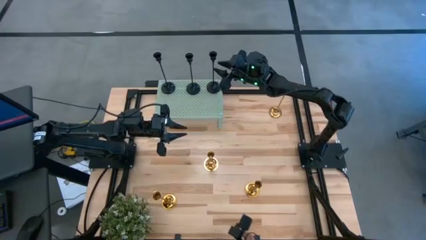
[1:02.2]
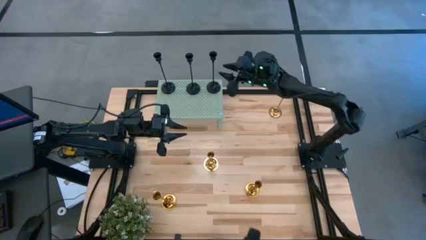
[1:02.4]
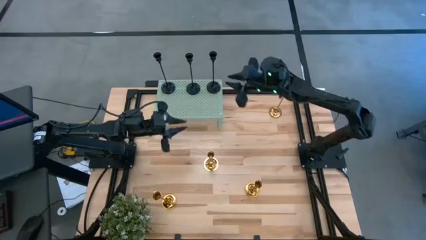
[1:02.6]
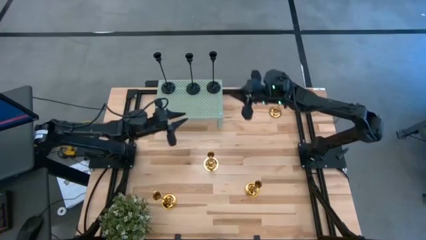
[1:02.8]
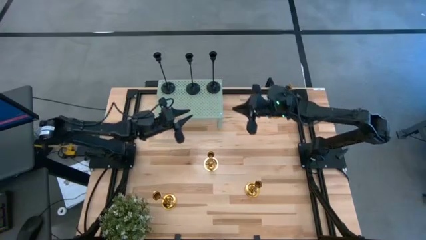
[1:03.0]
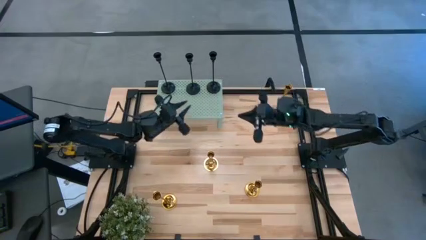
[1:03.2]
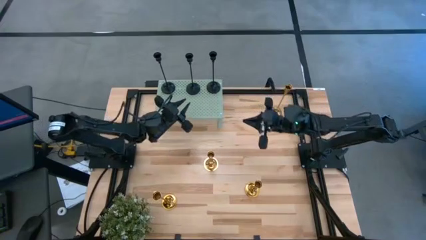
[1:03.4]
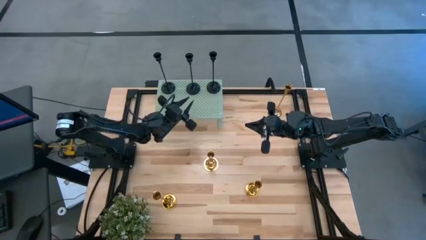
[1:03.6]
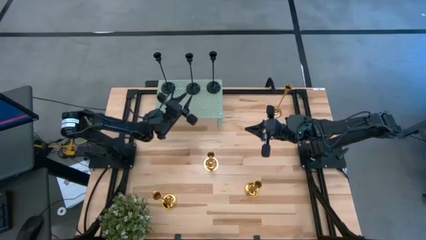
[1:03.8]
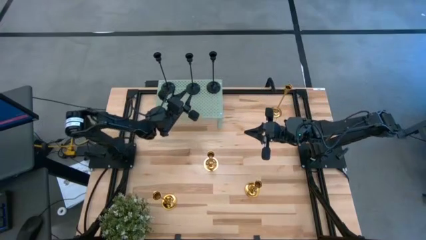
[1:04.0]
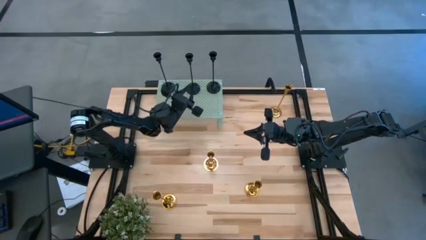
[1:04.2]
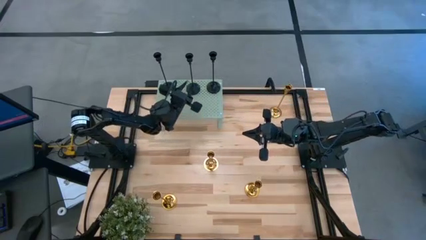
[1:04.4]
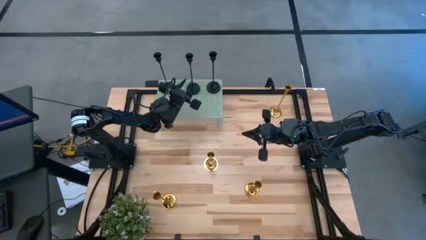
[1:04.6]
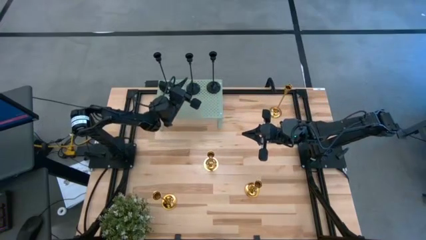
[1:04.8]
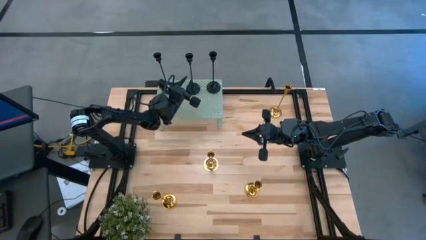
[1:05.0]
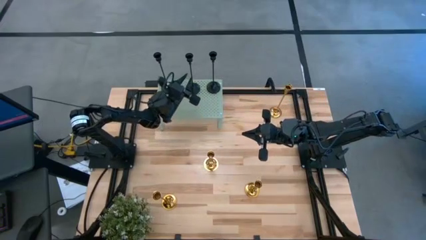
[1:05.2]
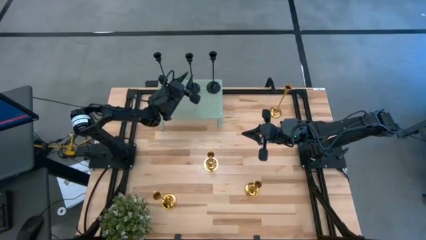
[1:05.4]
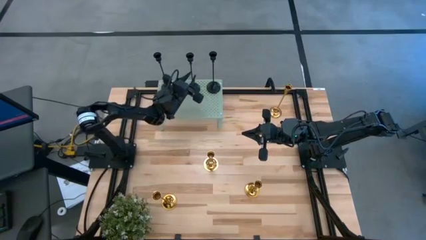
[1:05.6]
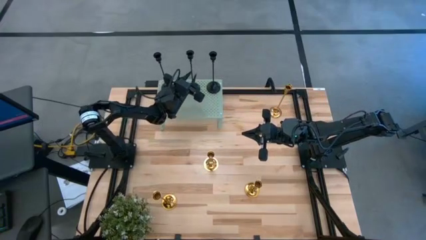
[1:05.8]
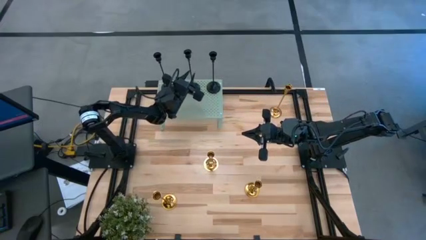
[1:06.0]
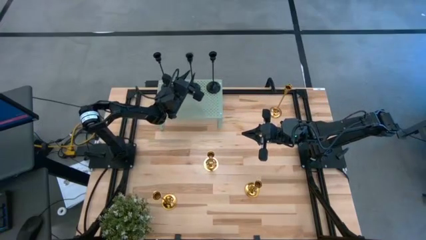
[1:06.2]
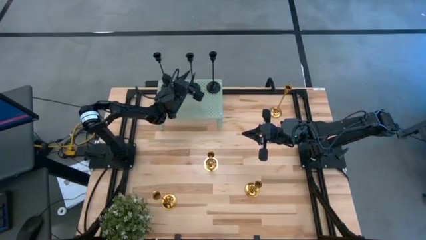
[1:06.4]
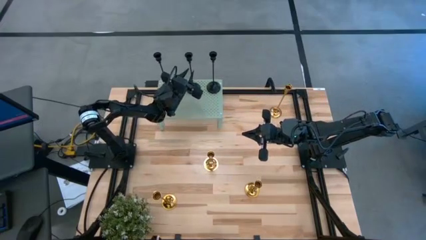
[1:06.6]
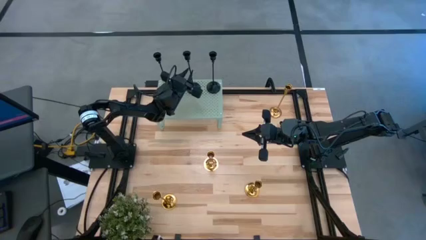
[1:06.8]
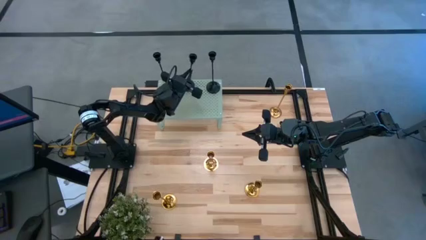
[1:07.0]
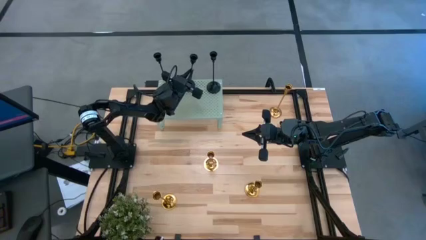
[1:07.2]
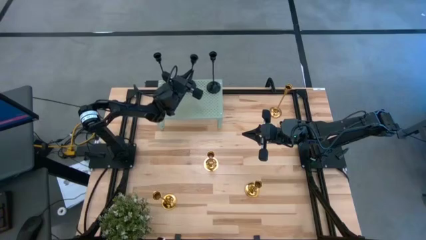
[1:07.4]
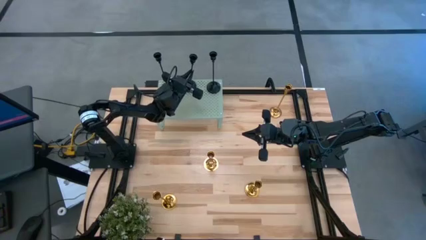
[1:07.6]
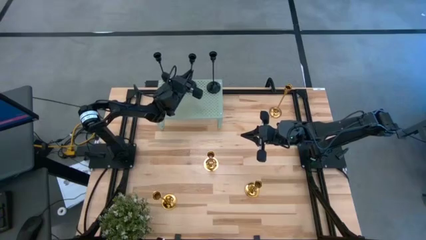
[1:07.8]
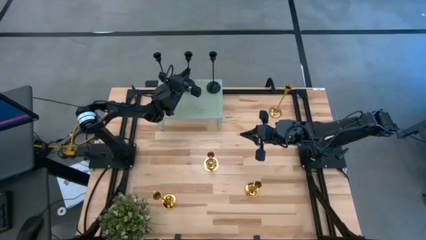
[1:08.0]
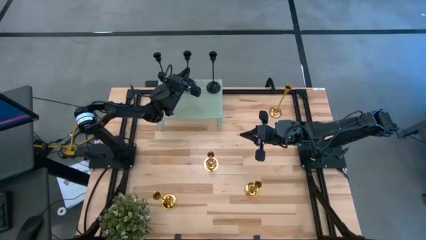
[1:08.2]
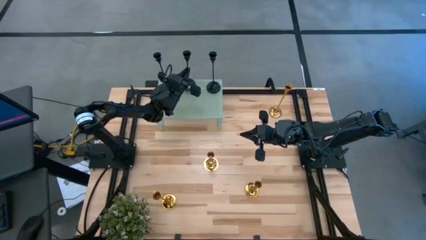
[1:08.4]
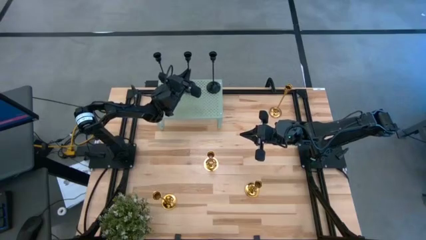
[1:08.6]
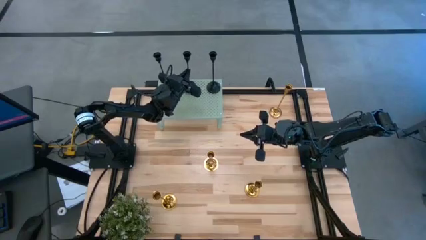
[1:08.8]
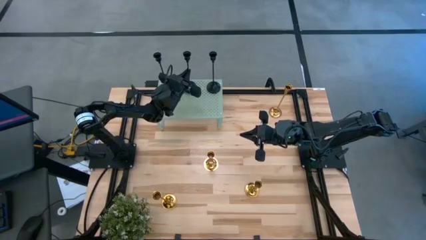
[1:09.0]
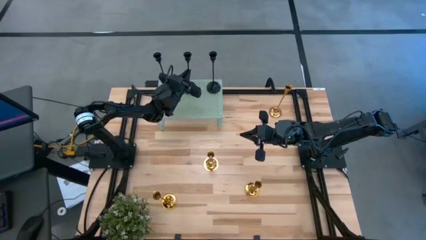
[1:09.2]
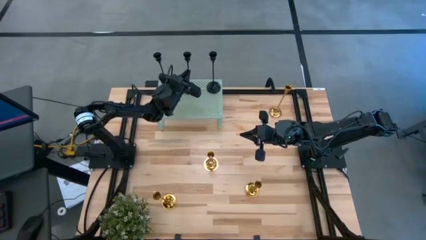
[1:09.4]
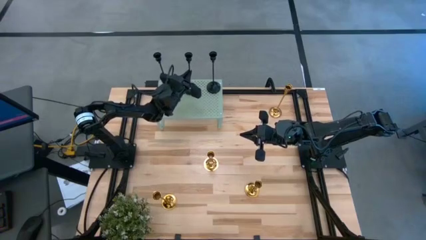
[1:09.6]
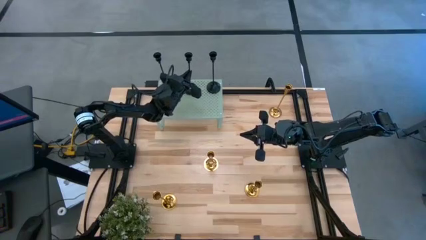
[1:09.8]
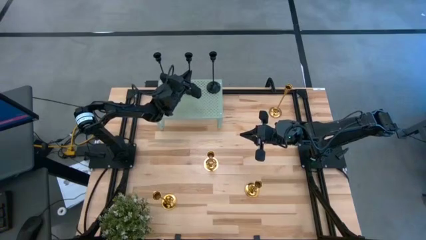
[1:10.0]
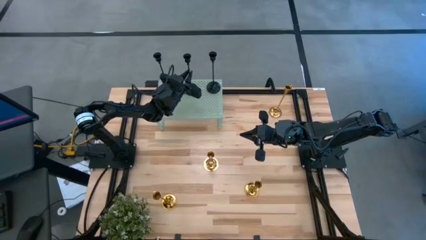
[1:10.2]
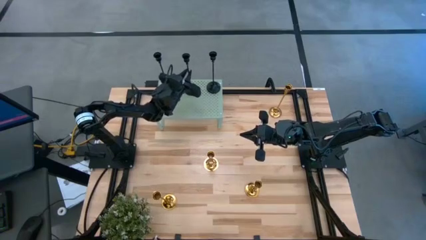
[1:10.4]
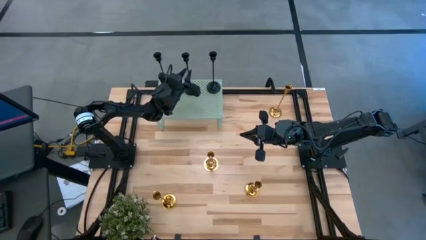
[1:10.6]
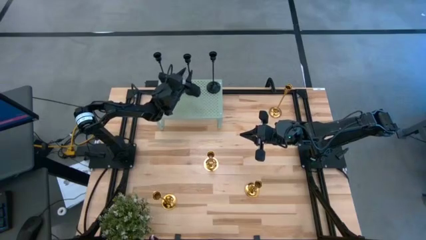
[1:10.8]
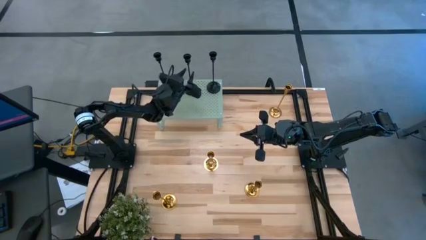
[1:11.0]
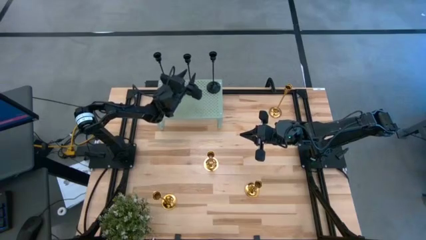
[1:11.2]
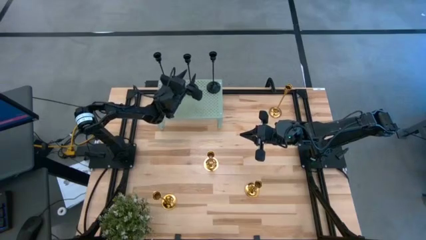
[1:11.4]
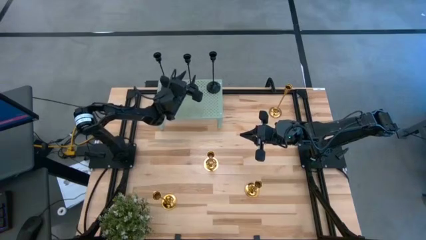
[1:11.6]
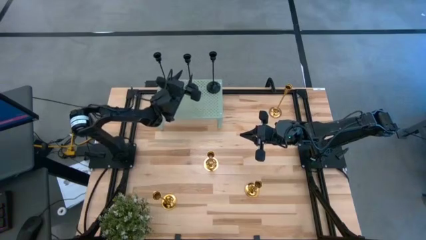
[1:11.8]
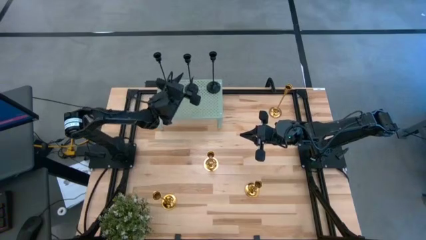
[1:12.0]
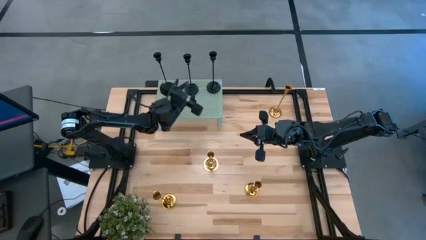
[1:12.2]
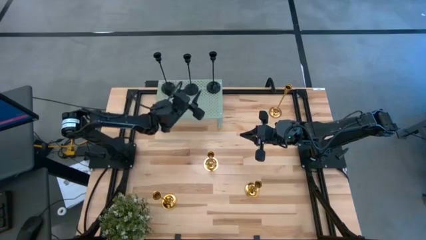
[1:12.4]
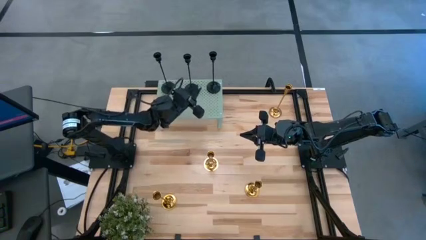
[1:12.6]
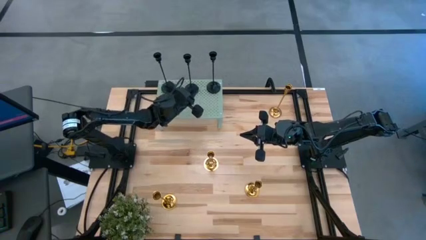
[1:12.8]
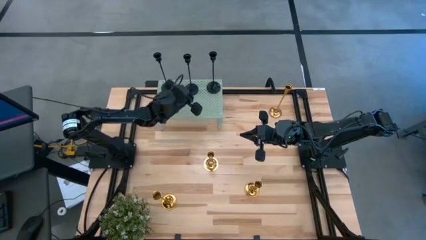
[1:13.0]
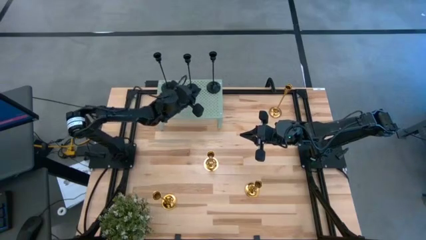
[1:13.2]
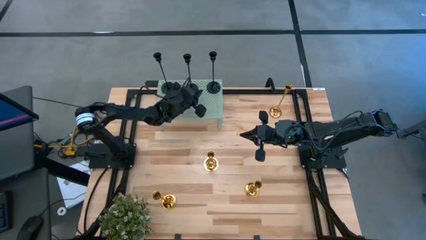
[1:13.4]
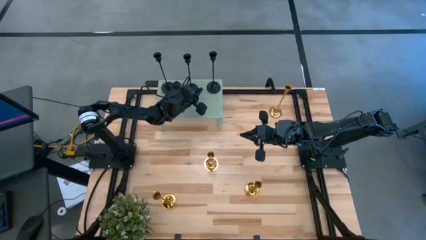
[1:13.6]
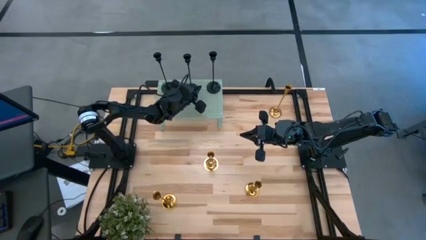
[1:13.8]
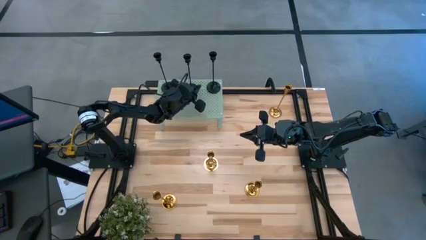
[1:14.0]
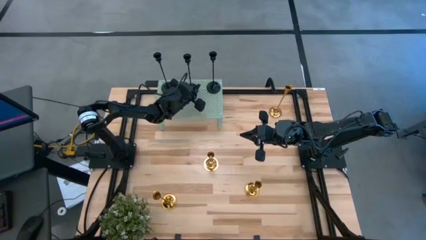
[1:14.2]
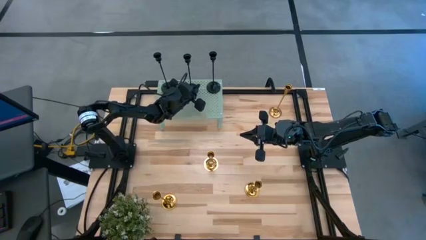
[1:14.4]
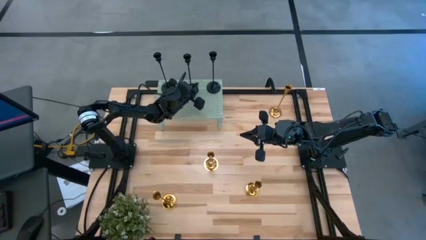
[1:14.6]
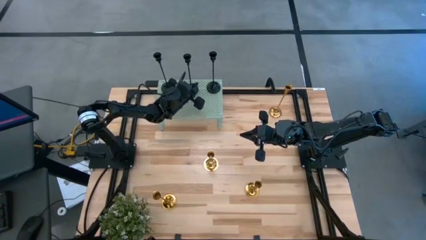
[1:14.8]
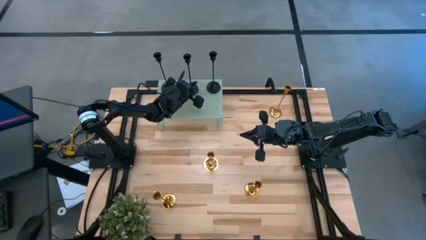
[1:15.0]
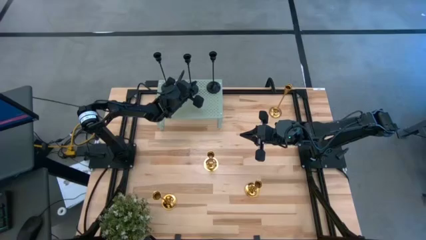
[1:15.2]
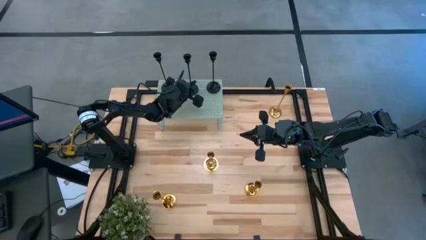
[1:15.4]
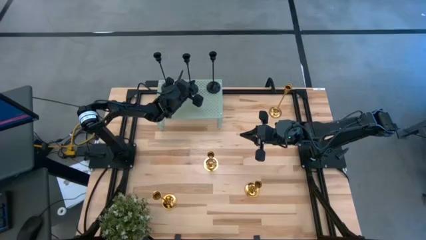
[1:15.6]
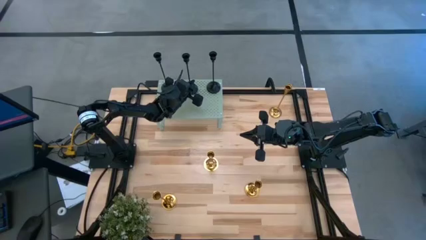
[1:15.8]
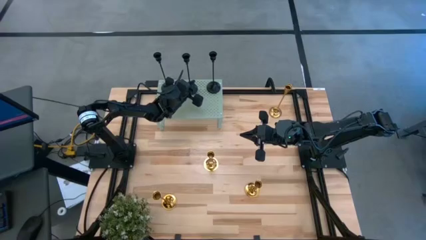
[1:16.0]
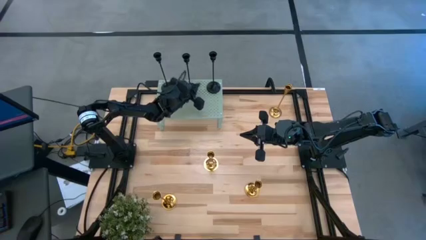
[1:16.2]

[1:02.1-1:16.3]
Task: Pick & Place candle stick holders
Adjust the black candle holder on the shelf

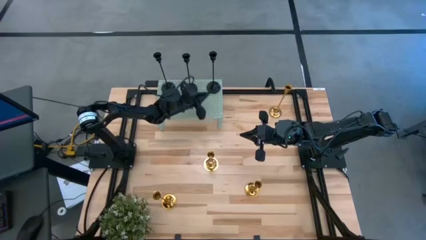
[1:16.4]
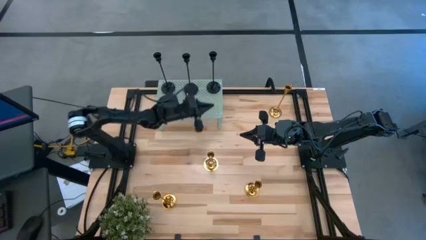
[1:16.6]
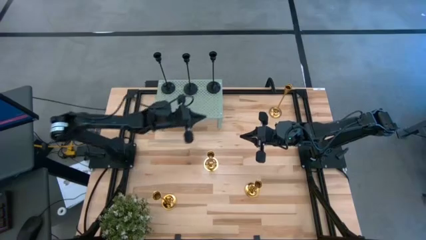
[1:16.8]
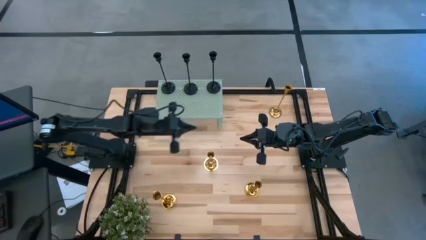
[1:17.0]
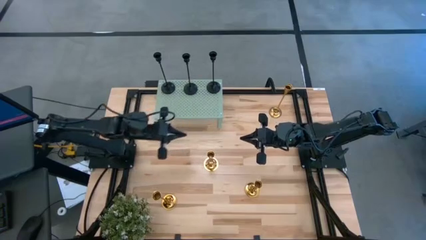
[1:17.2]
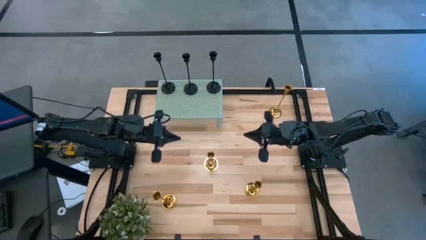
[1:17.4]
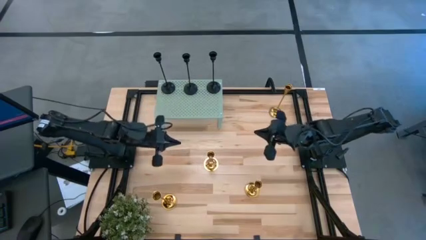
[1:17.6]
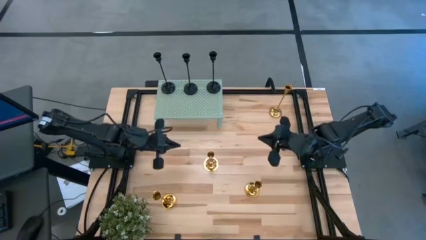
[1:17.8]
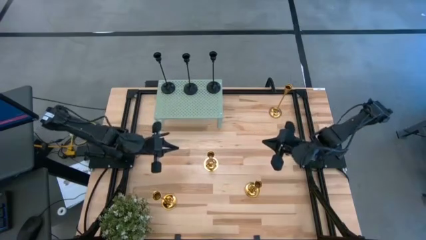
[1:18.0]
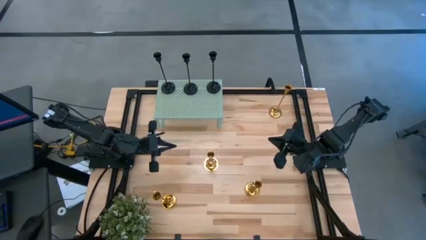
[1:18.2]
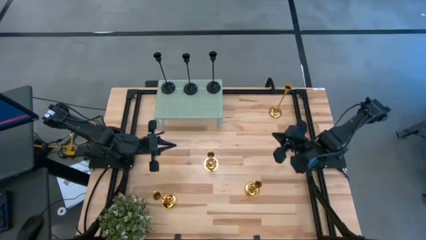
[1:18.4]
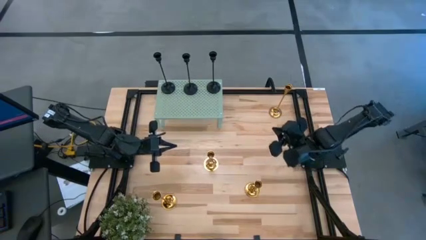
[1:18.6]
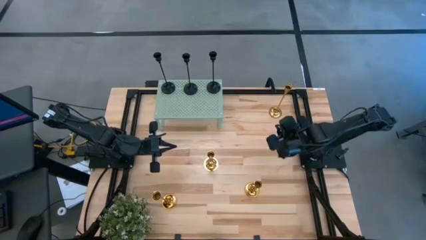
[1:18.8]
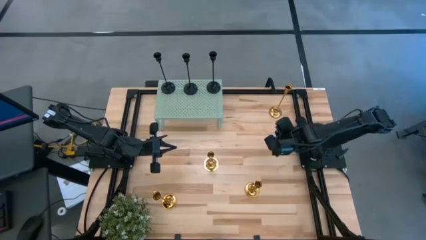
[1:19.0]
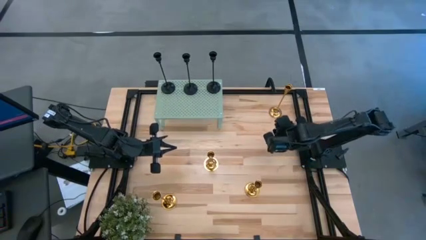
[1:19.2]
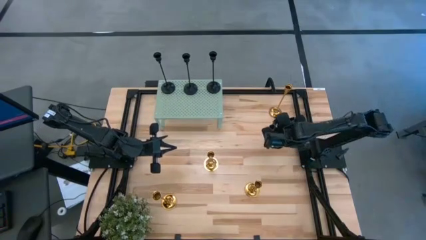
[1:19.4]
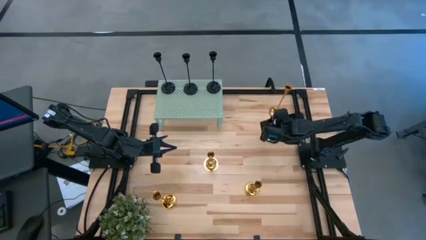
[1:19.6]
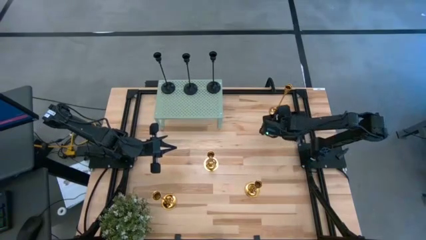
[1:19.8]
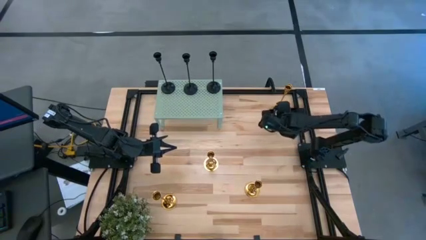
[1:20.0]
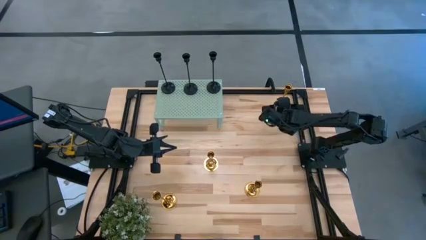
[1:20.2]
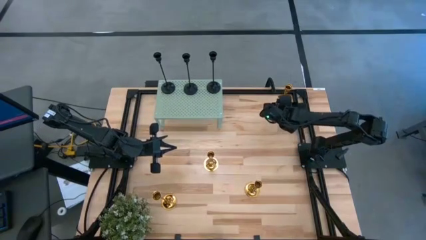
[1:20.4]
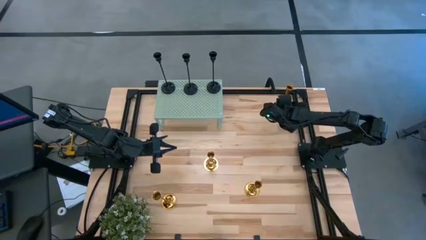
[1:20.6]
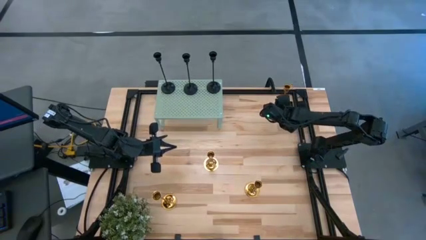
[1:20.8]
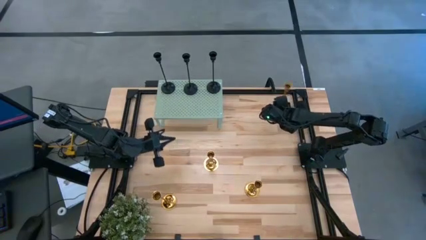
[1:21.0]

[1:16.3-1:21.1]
Put the gold candle holder on the shelf
